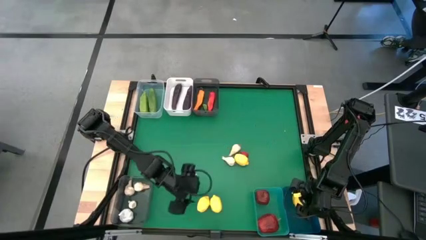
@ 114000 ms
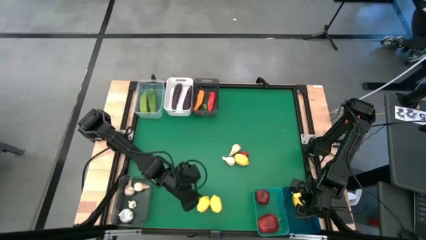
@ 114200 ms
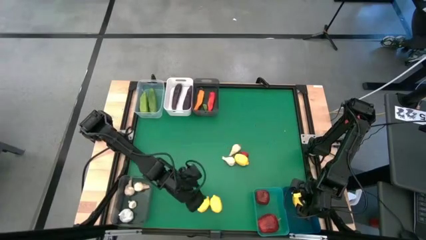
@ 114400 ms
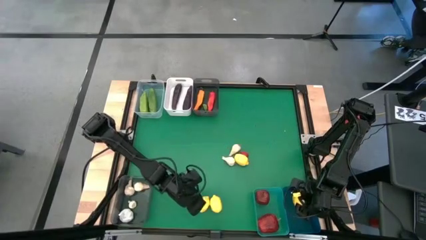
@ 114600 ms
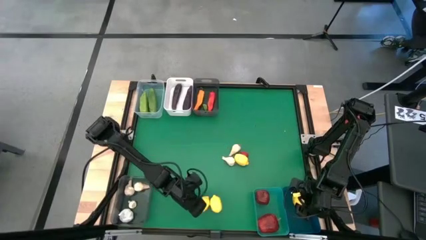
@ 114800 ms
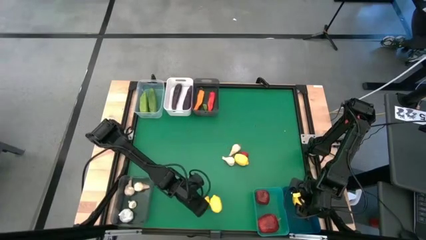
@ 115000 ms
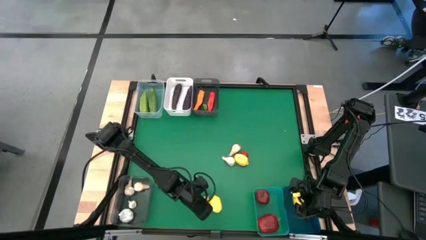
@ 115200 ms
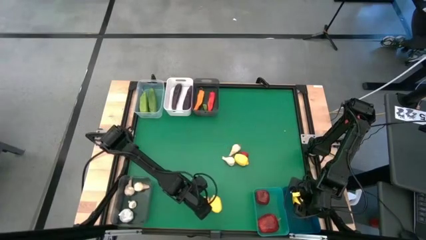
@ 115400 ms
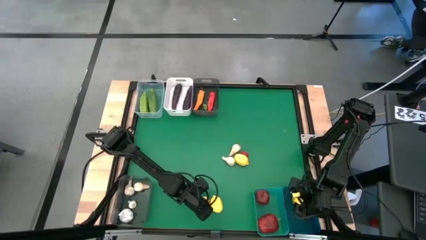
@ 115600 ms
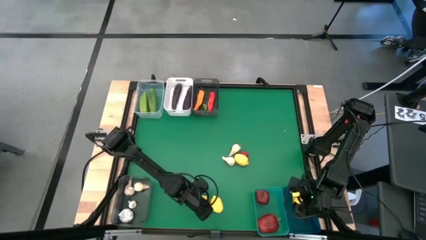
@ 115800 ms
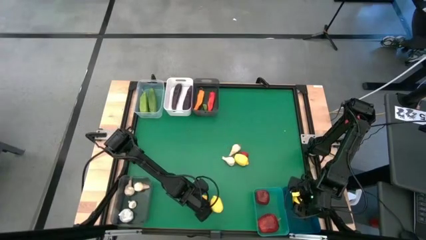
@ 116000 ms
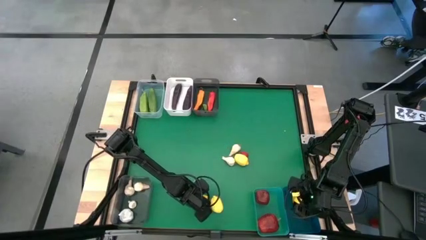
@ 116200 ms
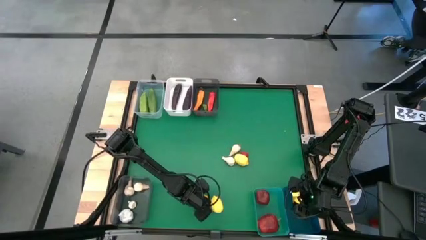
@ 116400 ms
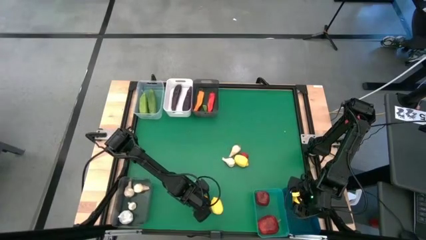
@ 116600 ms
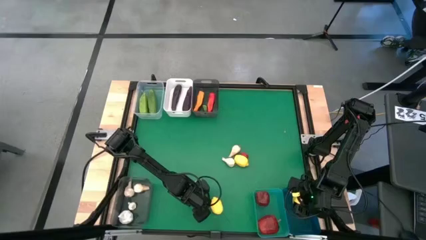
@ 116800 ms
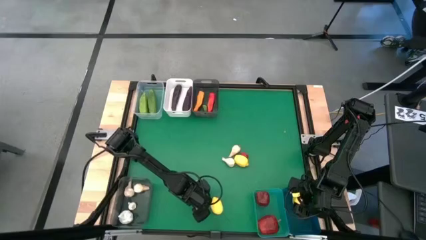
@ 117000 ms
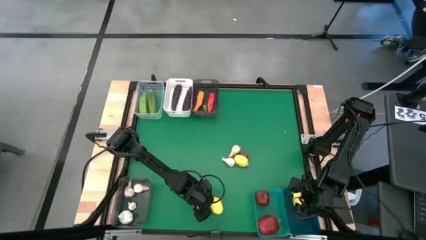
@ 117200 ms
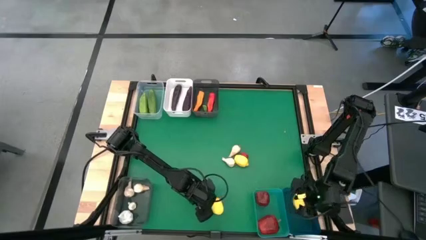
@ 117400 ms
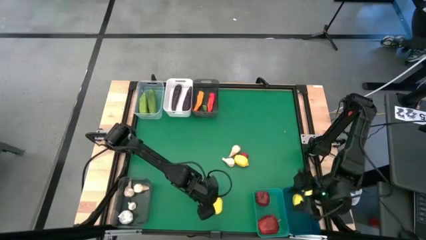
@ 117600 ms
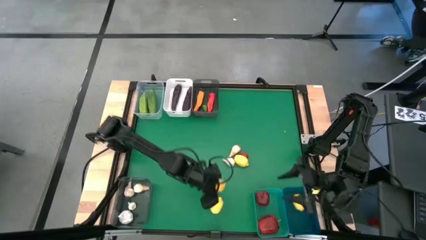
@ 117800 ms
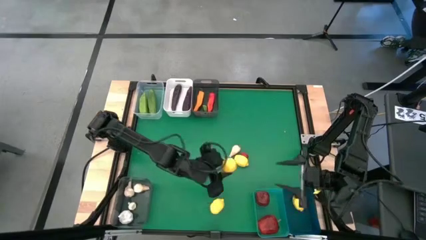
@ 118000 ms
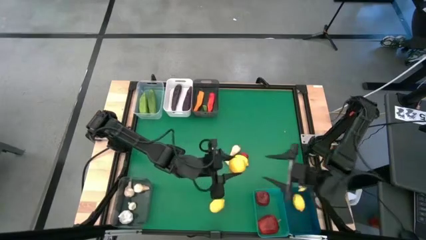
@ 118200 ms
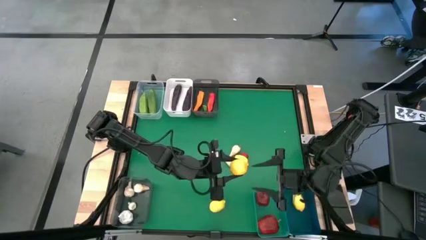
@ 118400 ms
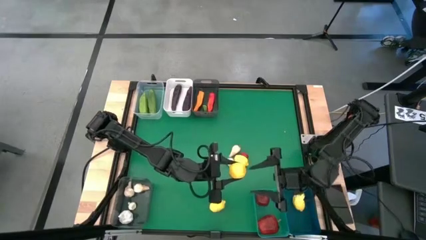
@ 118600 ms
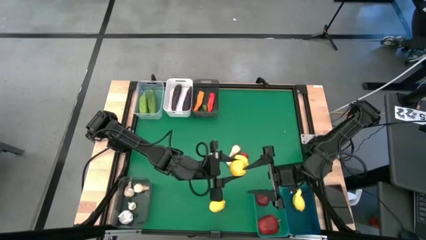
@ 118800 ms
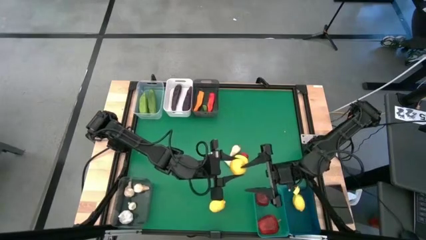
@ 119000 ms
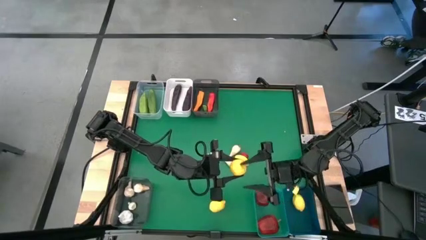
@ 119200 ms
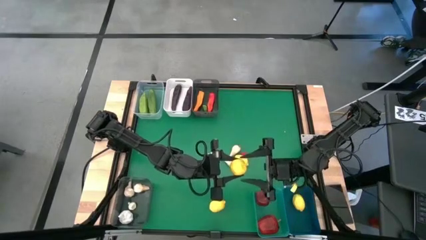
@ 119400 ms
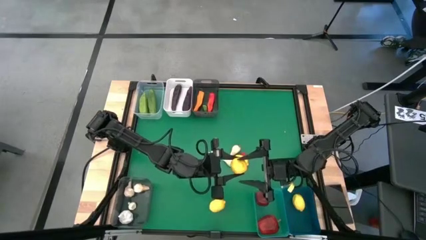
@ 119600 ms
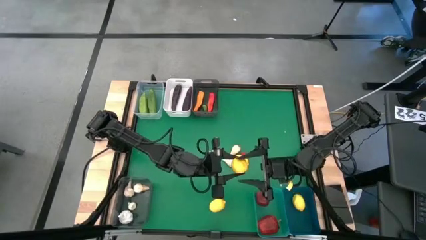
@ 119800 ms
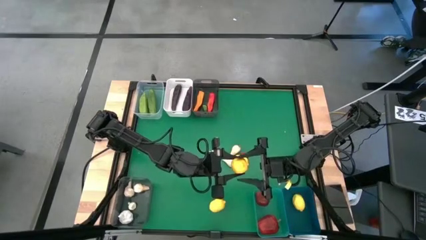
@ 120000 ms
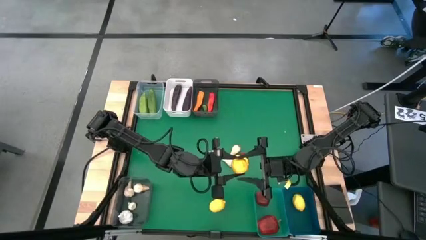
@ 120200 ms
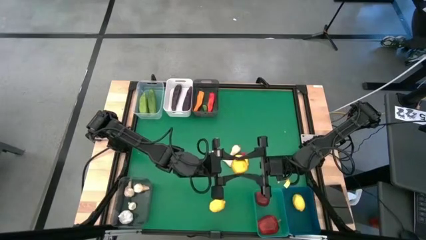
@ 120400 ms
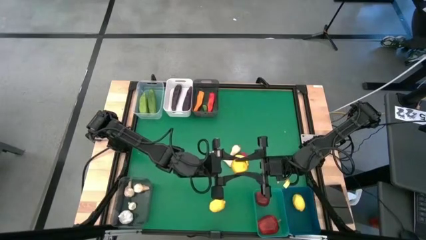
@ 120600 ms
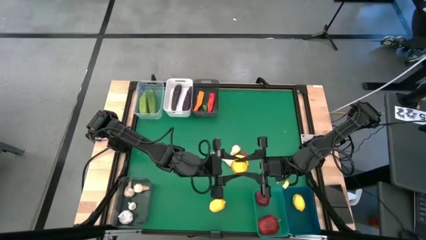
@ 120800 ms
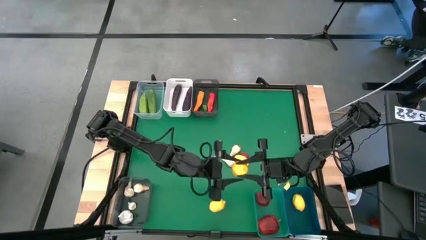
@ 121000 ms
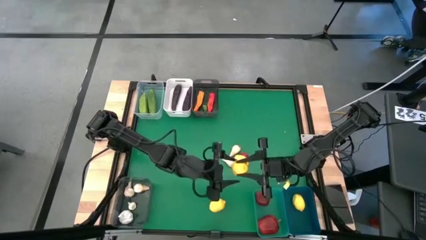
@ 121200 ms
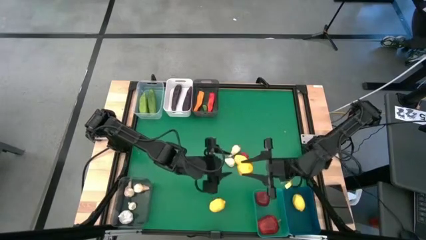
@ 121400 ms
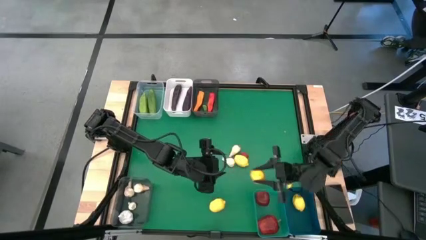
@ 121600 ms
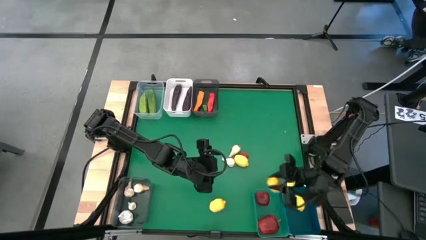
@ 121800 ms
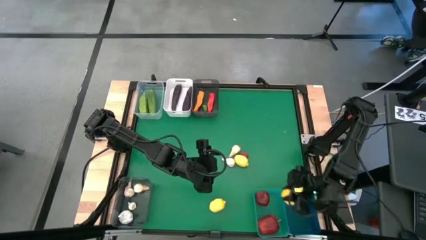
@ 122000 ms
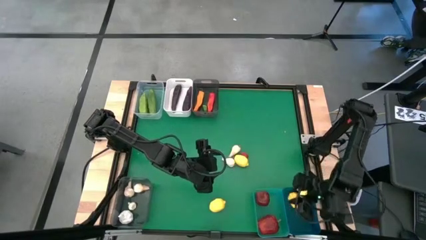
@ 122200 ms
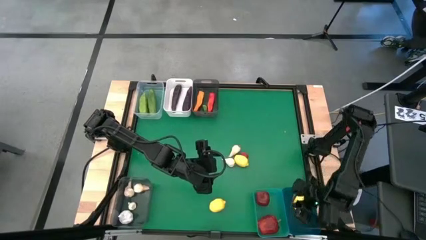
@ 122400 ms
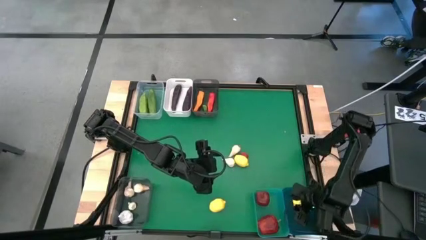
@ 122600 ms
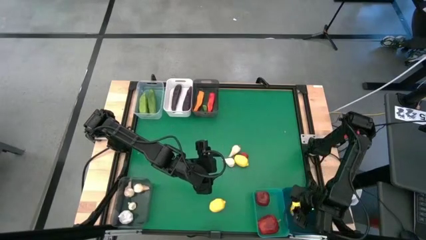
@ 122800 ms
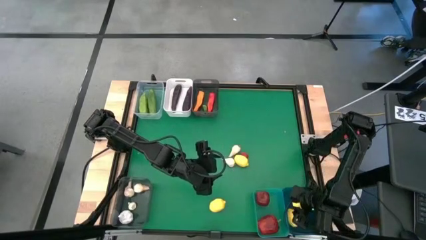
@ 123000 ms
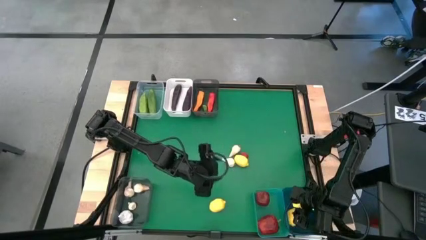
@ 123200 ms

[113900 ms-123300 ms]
Task: Sort produce into baskets
Put the yellow lemon into the blue bin

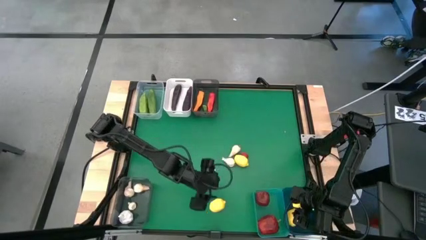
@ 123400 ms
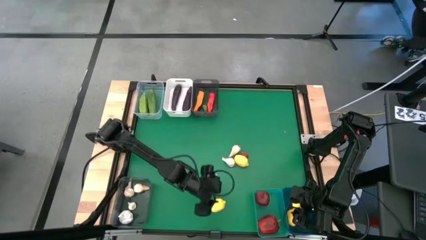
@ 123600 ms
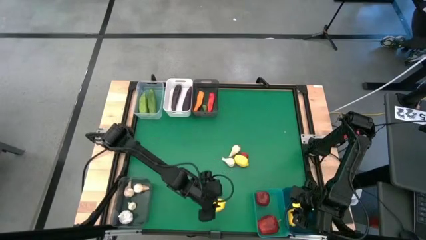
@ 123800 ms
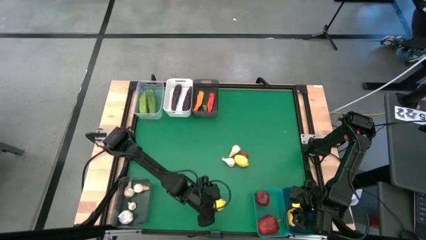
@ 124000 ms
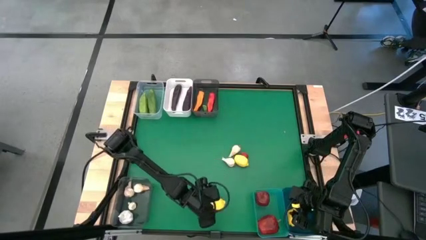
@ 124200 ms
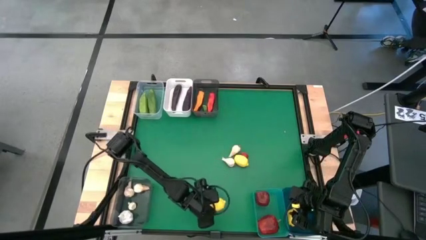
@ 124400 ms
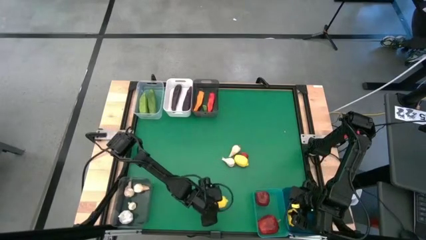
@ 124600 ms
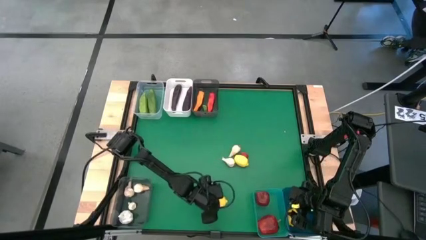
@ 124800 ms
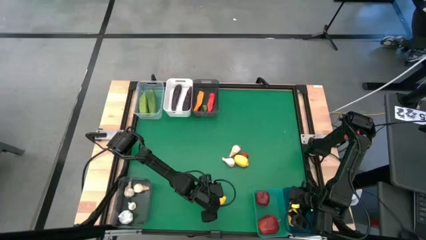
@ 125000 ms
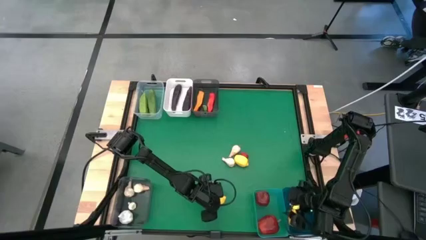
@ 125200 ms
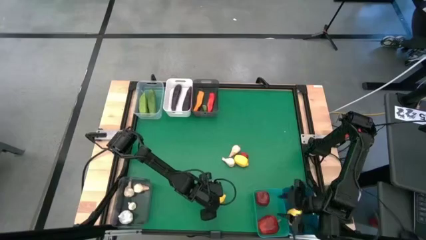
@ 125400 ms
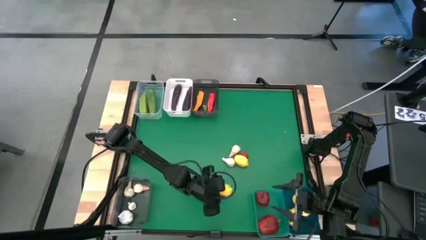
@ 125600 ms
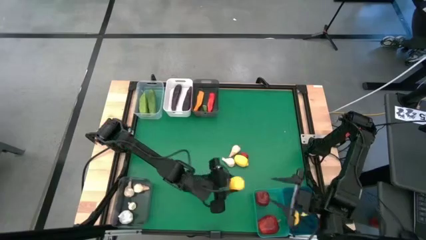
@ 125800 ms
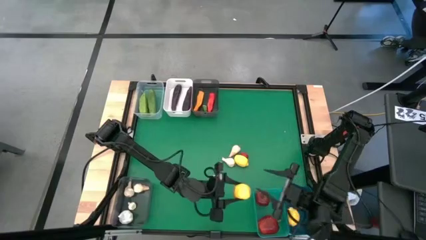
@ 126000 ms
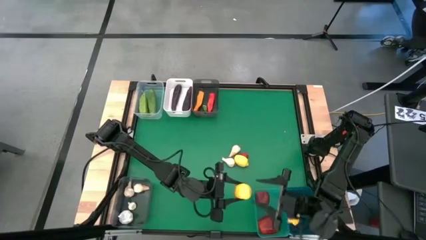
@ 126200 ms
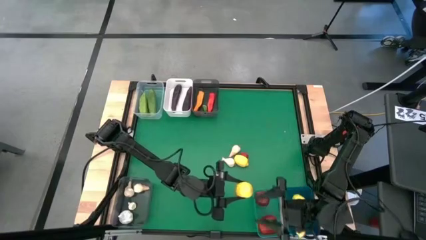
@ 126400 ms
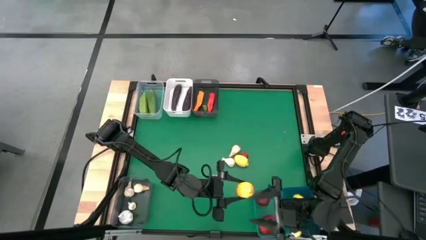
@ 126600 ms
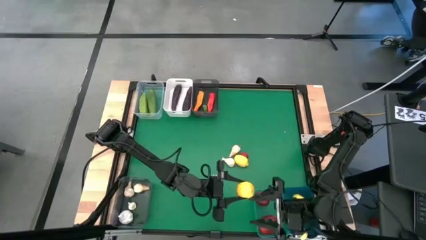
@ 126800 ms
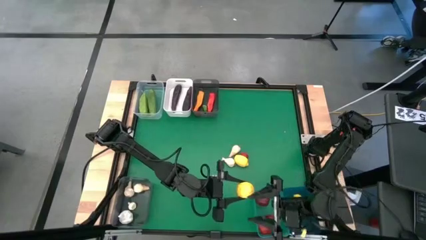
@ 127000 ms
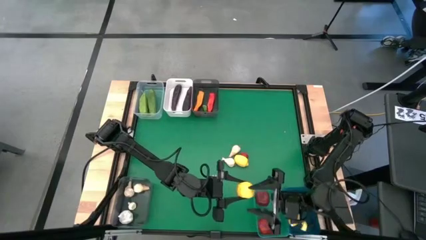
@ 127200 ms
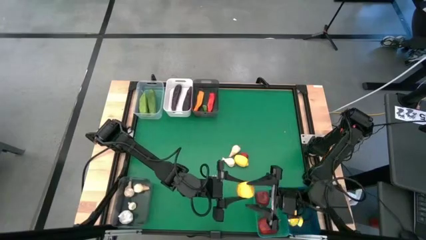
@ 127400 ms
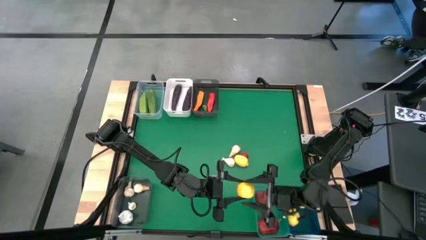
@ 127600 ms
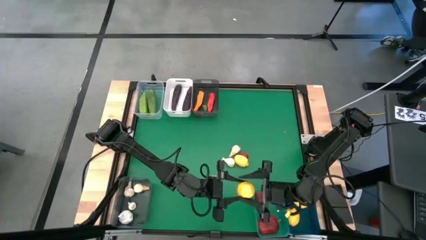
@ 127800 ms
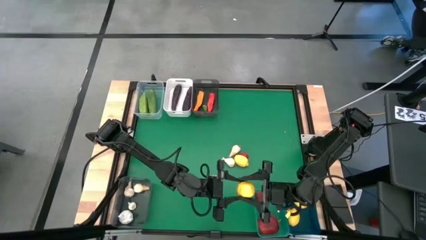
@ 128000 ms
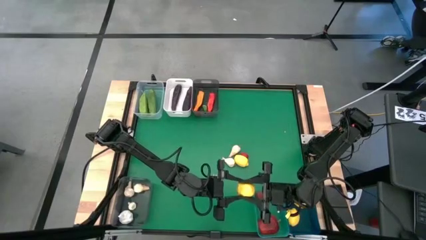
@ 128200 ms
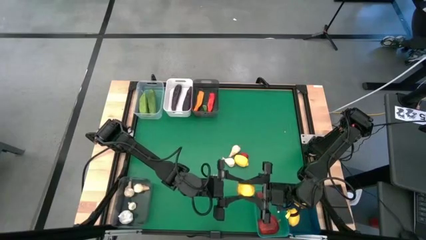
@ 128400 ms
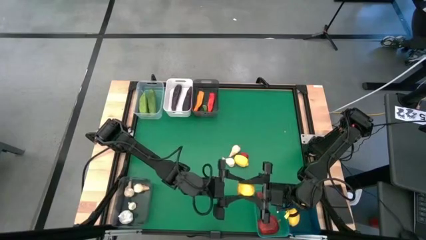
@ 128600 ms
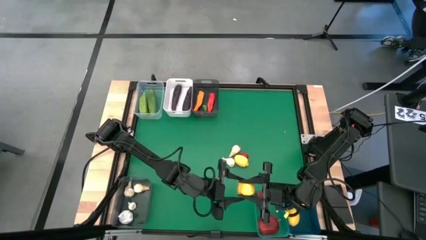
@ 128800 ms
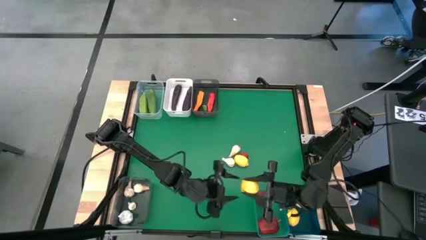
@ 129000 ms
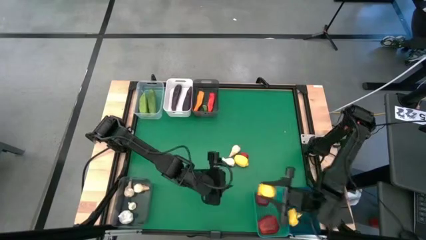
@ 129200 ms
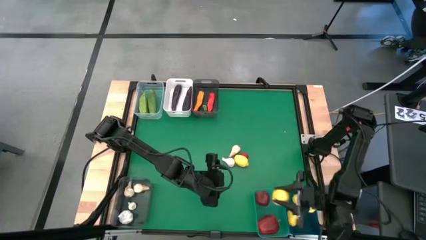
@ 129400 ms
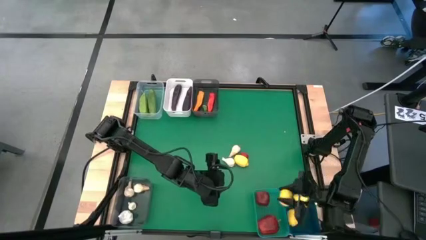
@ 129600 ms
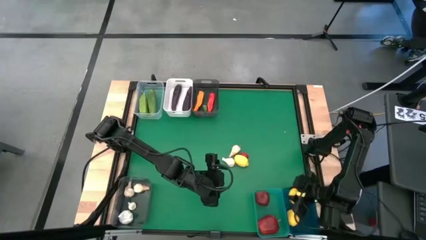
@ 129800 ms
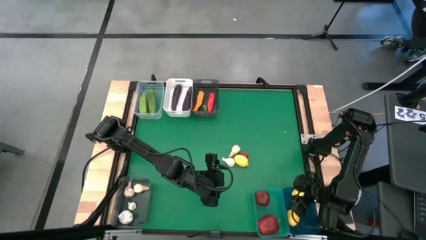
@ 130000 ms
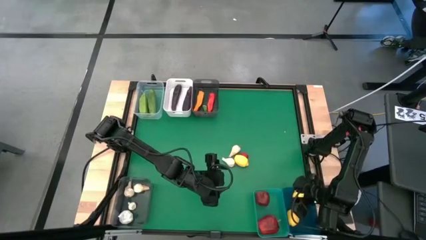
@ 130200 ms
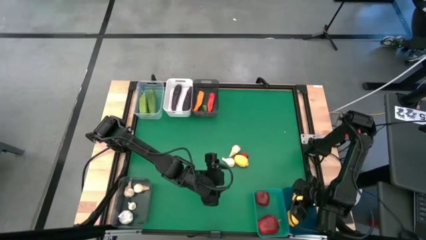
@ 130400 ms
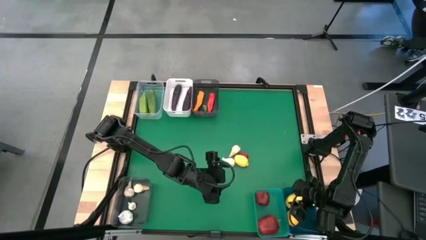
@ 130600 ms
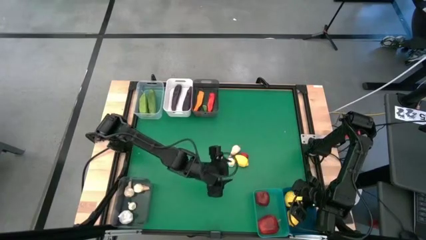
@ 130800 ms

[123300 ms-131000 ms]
Put the yellow lemon into the blue bin
